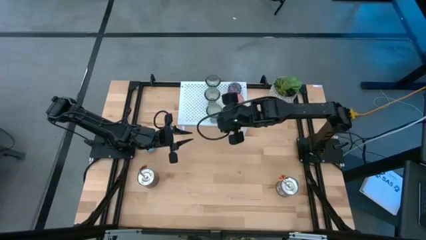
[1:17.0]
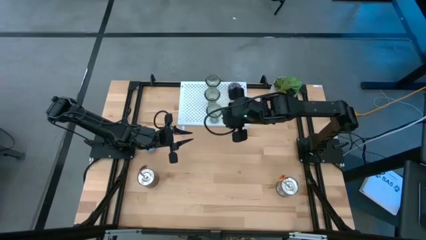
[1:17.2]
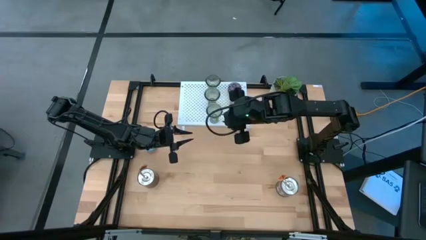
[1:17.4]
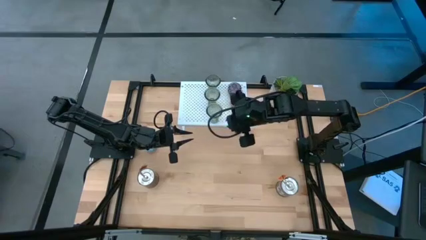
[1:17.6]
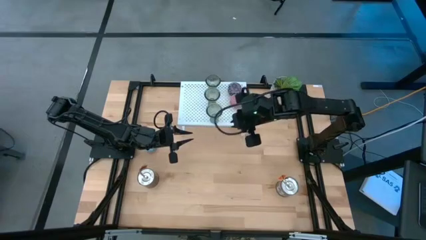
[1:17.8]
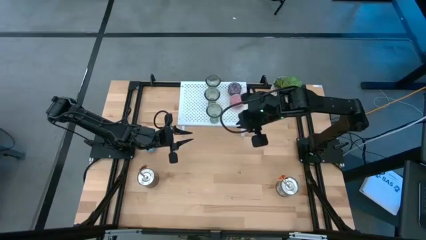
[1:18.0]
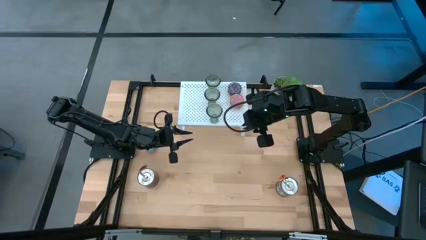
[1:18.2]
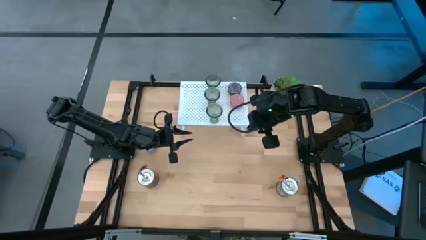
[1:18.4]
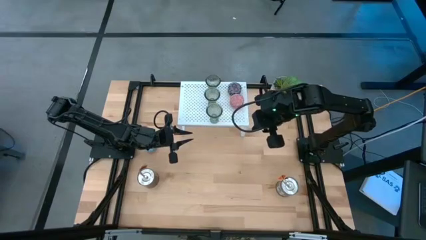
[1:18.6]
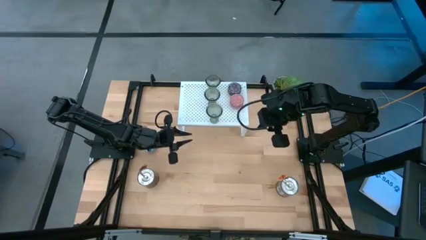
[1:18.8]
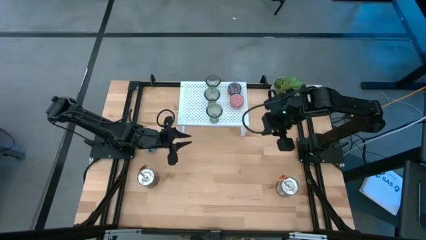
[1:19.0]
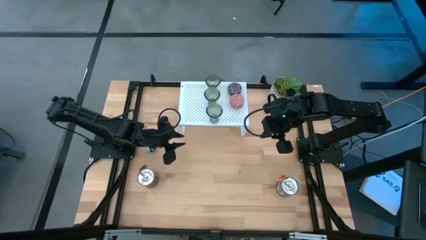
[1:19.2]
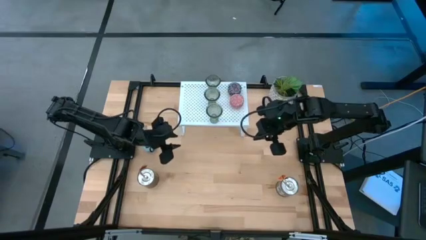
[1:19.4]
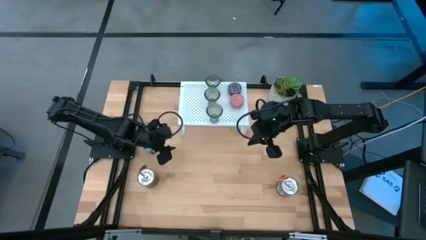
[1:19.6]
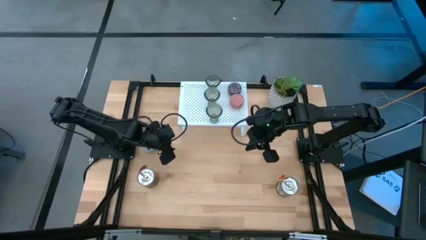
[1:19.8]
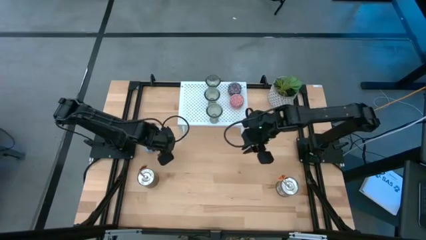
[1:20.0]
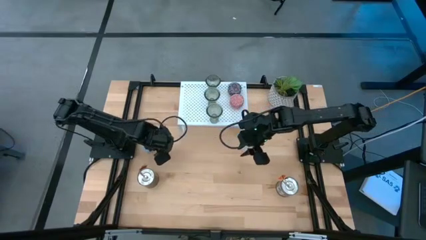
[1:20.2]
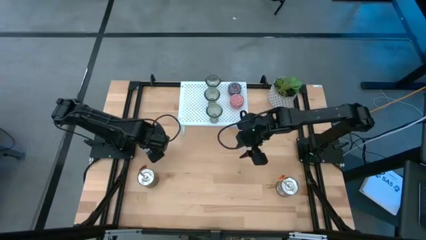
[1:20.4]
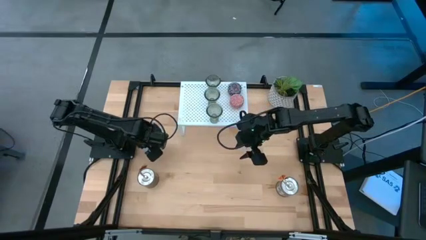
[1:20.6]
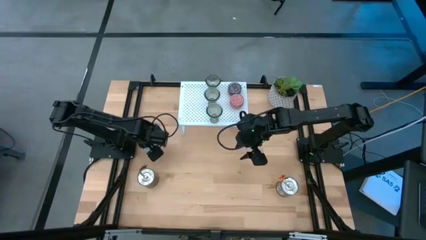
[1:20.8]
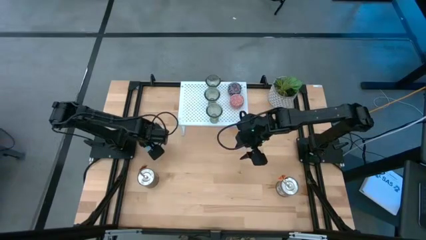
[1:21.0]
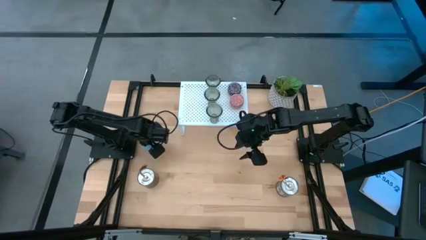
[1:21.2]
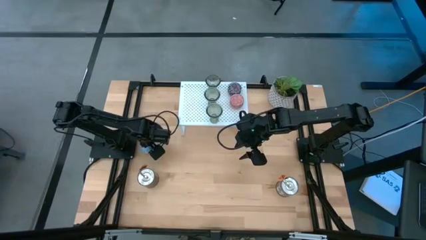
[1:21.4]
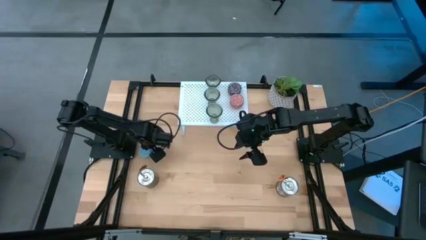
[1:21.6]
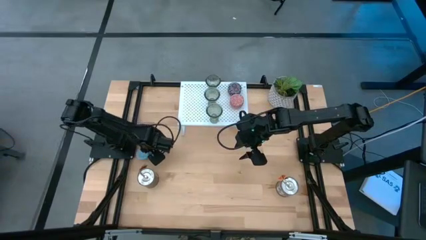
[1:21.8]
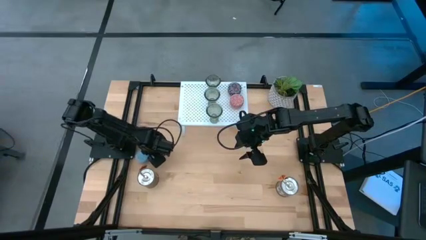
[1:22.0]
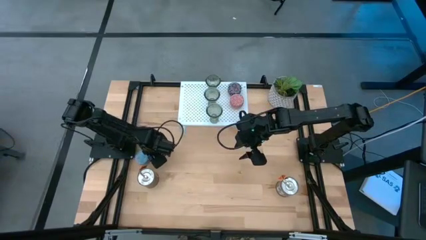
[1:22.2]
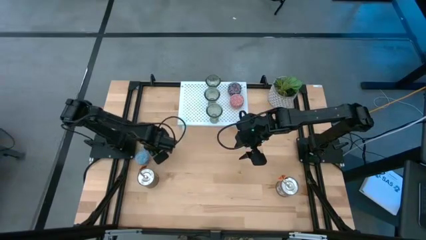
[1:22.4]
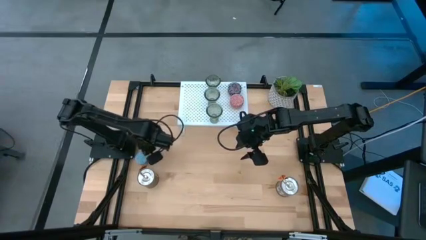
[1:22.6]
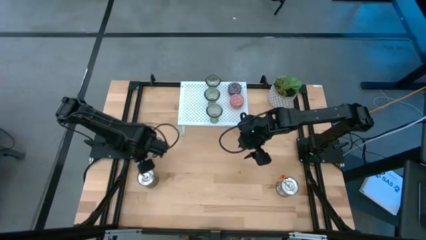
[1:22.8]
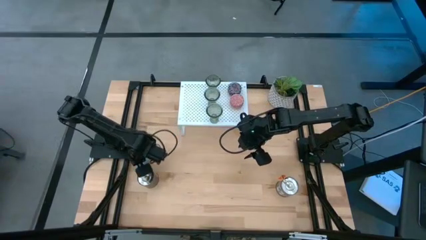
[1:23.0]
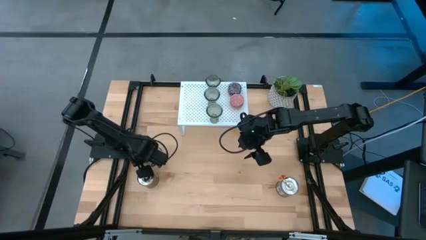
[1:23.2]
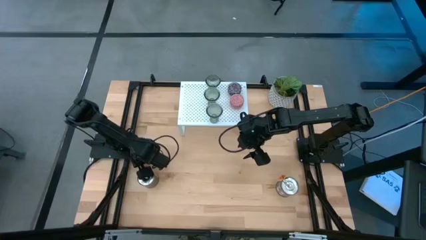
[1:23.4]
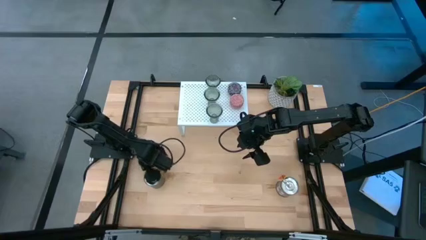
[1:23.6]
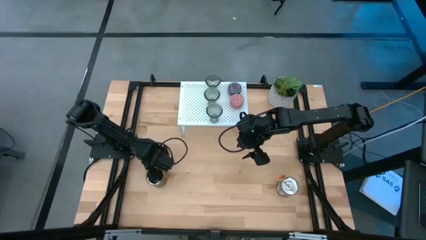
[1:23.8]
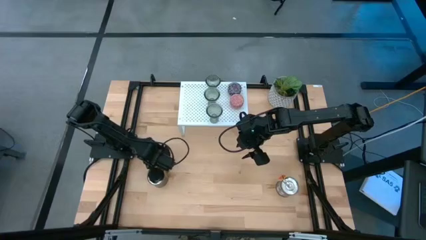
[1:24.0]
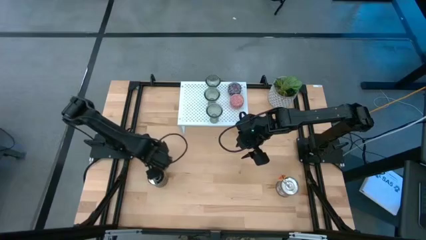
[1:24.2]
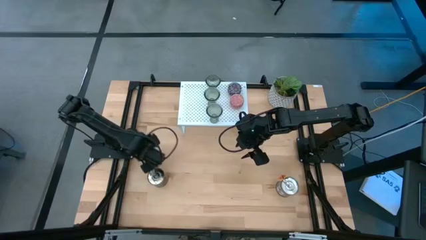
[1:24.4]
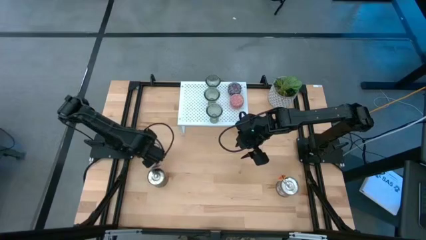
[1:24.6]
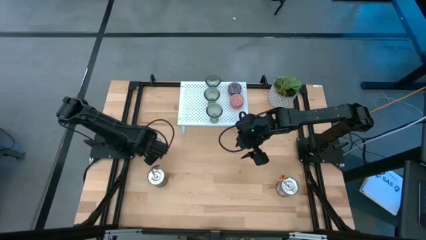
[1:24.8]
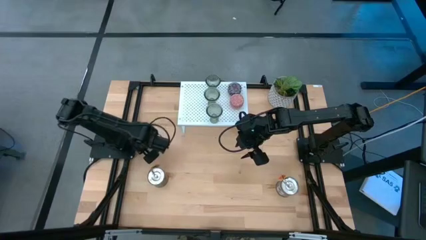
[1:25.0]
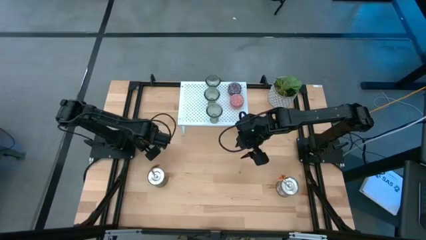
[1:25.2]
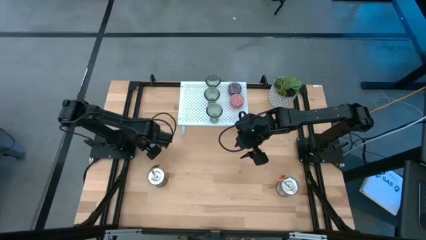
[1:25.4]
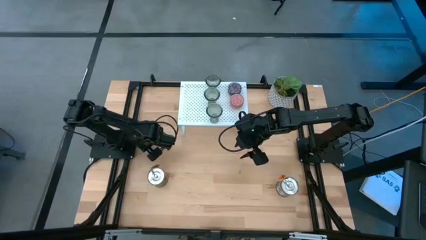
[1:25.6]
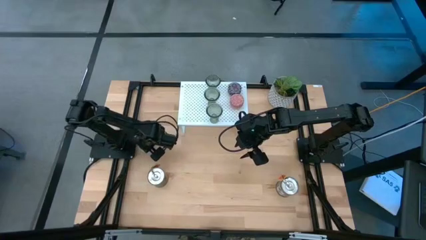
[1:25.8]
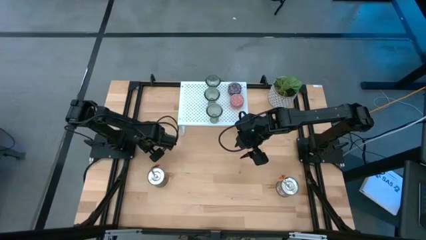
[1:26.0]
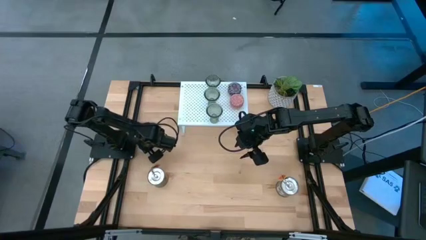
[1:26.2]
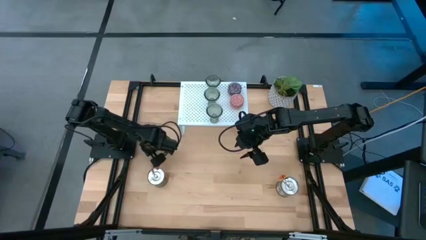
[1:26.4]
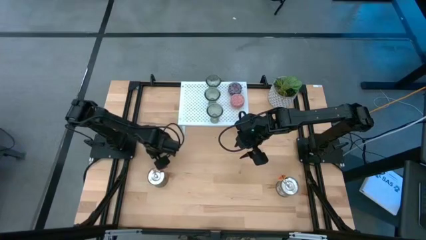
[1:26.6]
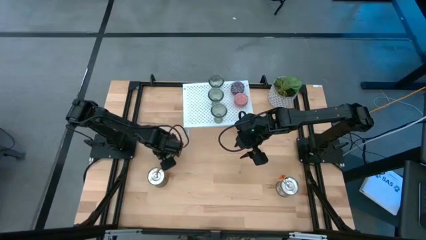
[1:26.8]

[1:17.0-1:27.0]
Task: Pick & Place candle stick holders
Put the blue patterned scented candle on the shelf aligned with the other patterned scented candles

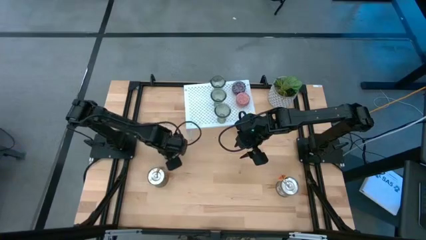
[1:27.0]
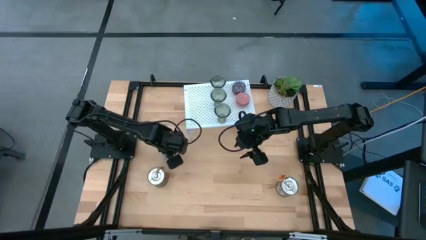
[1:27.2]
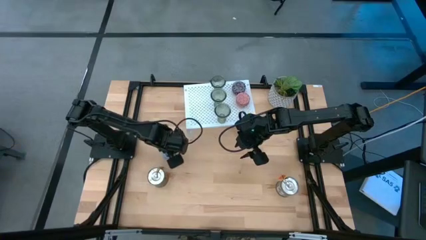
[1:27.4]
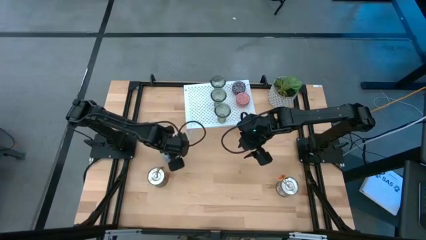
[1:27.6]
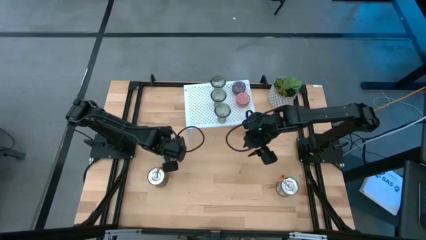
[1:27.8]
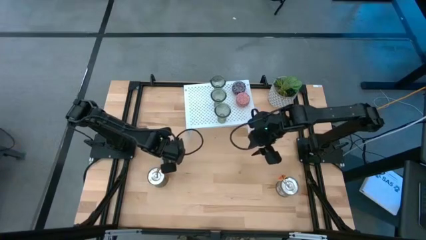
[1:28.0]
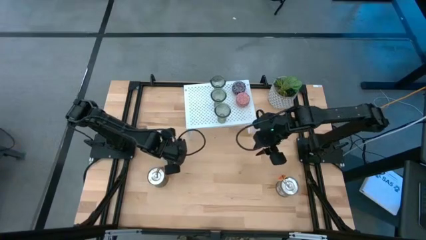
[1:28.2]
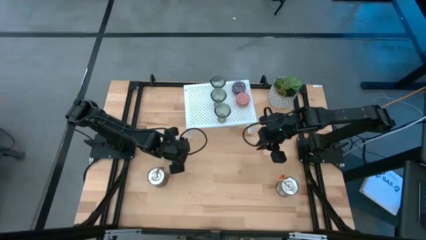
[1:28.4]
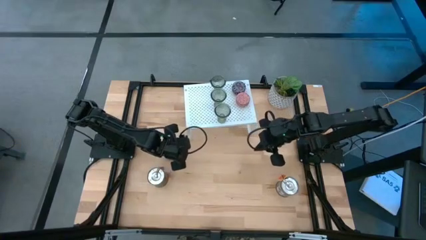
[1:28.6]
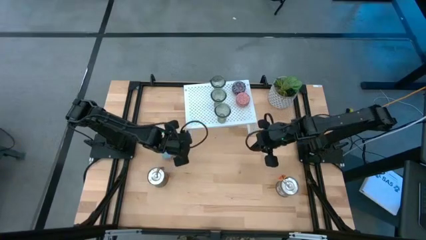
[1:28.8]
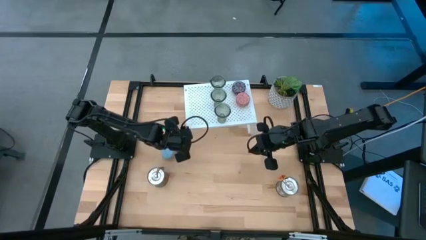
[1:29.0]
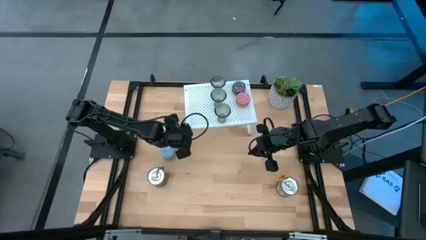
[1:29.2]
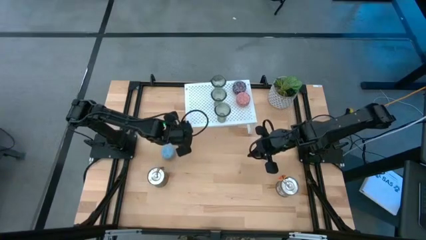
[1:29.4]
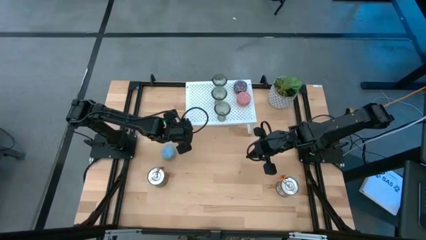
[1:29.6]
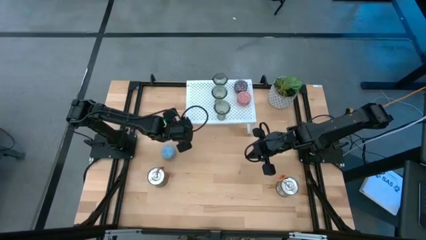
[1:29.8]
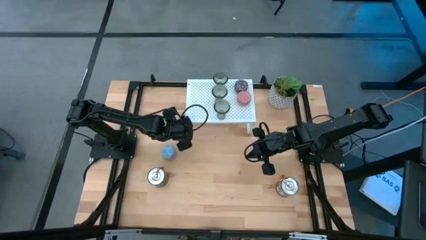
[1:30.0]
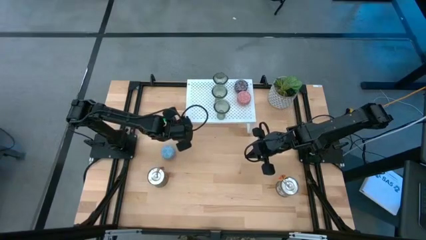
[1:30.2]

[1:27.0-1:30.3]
Adjust the shelf
